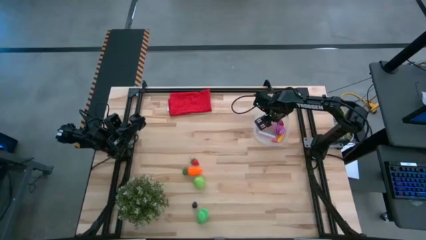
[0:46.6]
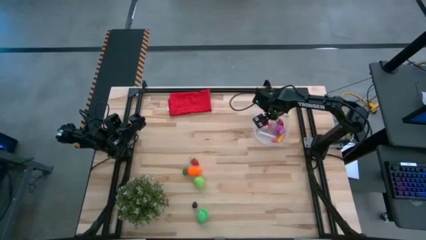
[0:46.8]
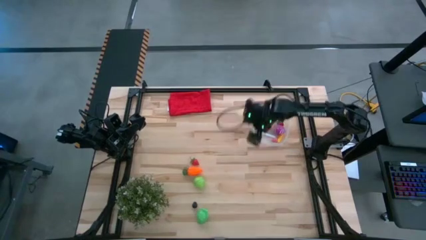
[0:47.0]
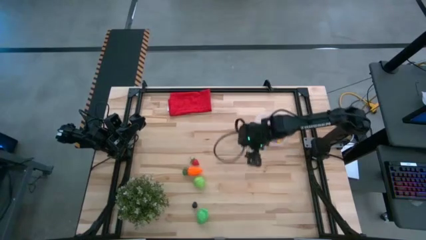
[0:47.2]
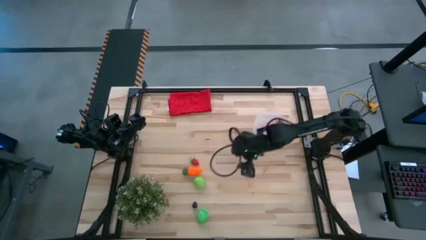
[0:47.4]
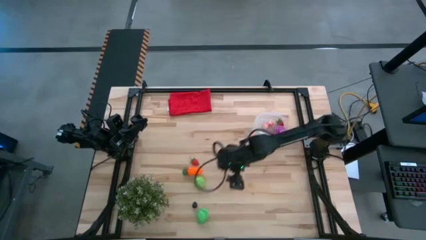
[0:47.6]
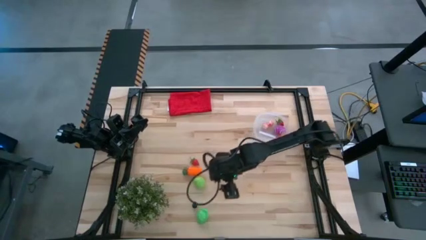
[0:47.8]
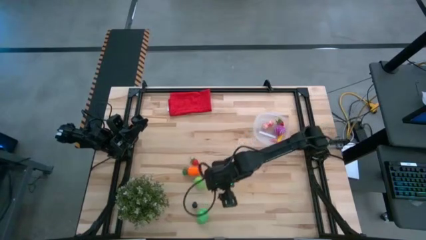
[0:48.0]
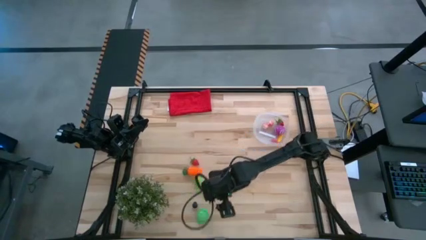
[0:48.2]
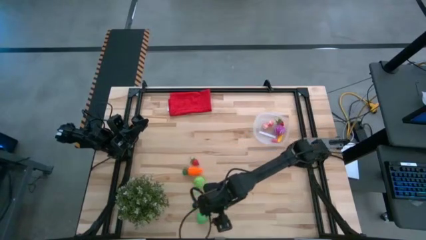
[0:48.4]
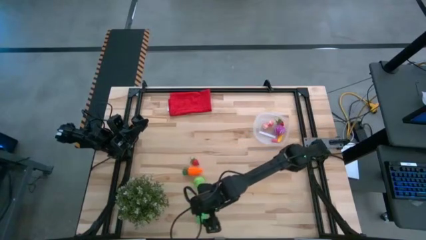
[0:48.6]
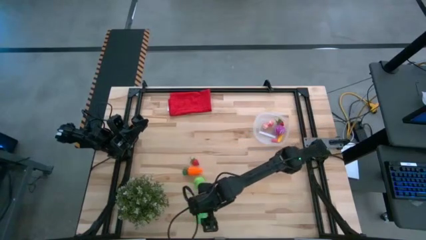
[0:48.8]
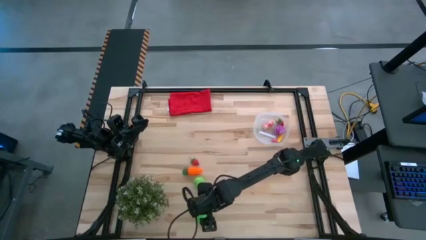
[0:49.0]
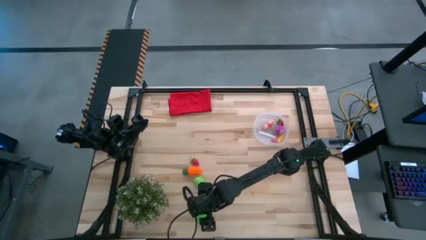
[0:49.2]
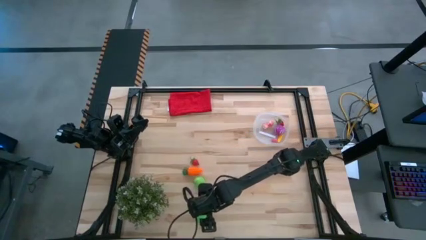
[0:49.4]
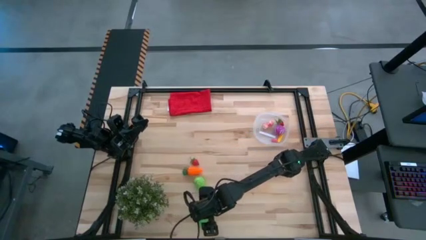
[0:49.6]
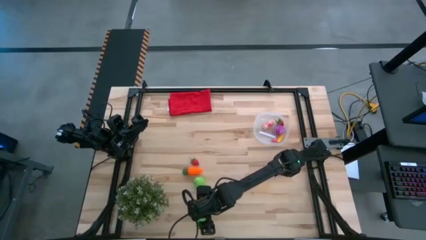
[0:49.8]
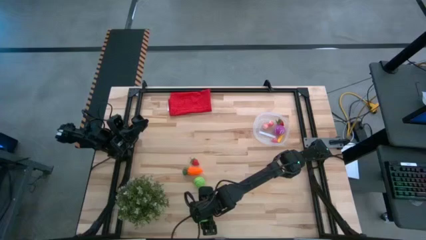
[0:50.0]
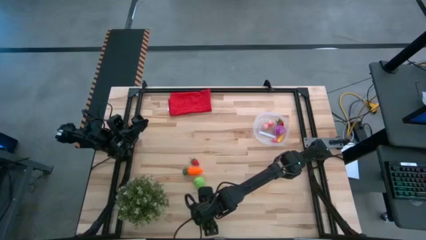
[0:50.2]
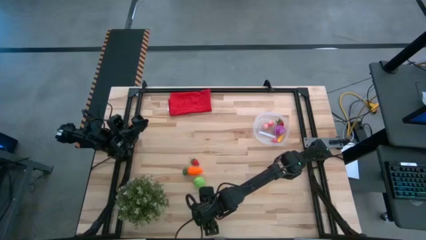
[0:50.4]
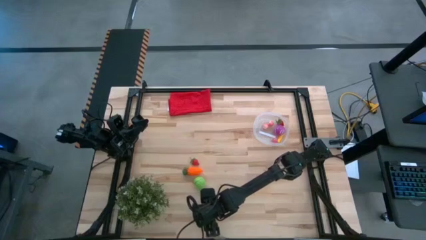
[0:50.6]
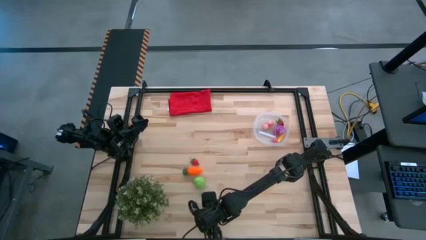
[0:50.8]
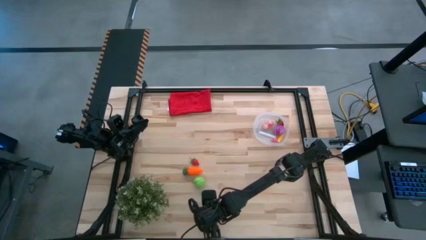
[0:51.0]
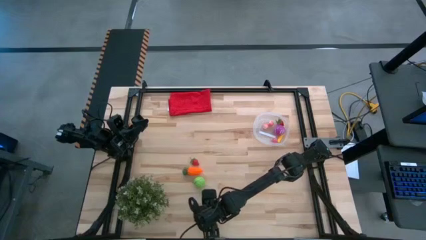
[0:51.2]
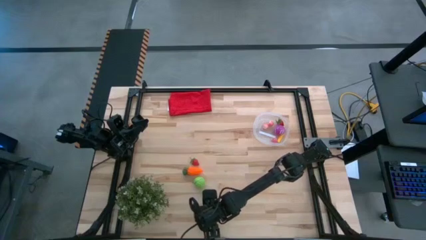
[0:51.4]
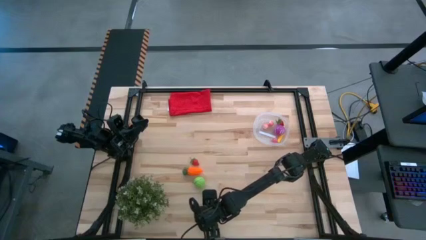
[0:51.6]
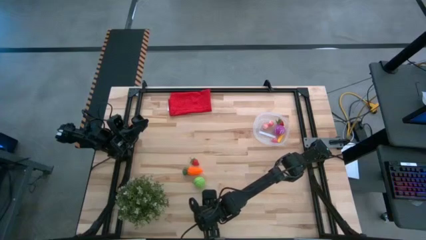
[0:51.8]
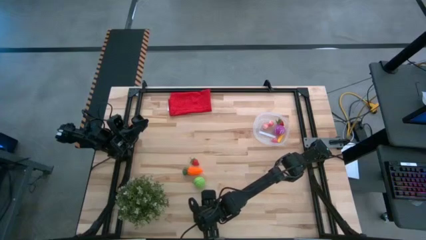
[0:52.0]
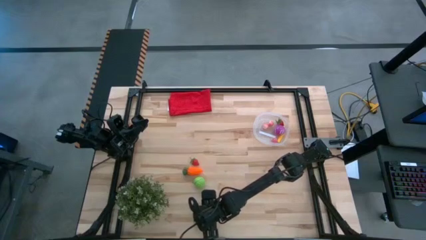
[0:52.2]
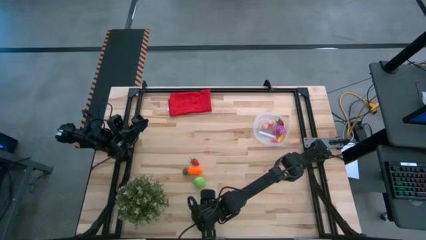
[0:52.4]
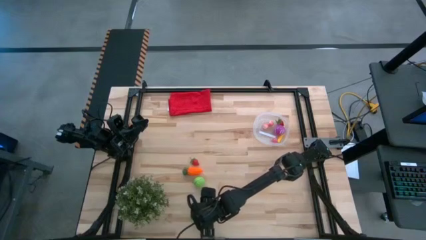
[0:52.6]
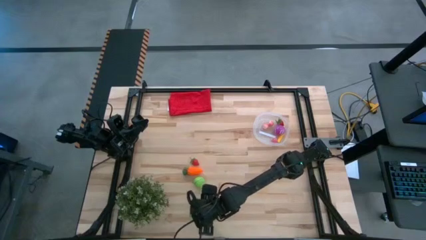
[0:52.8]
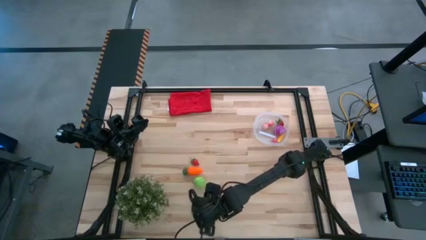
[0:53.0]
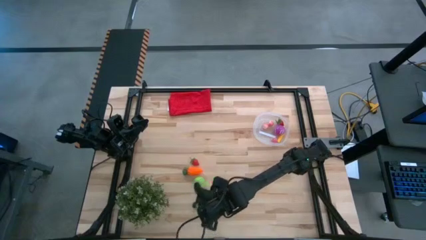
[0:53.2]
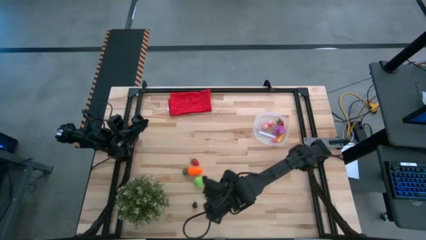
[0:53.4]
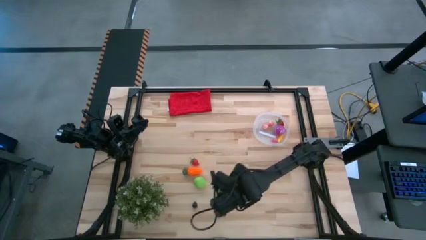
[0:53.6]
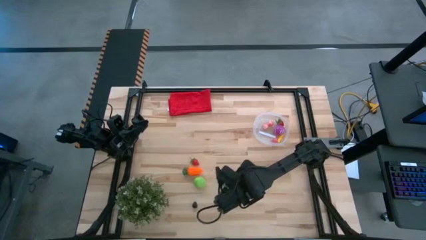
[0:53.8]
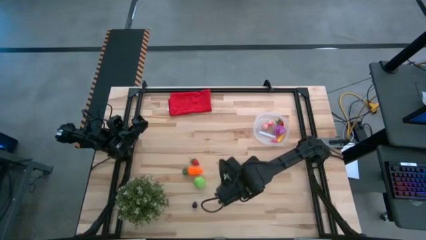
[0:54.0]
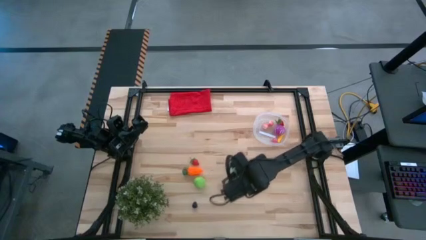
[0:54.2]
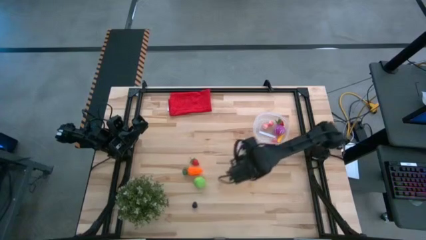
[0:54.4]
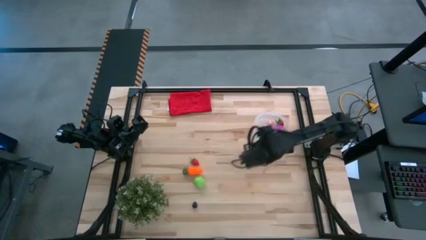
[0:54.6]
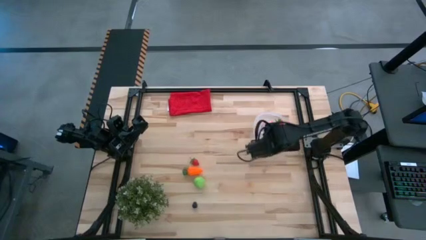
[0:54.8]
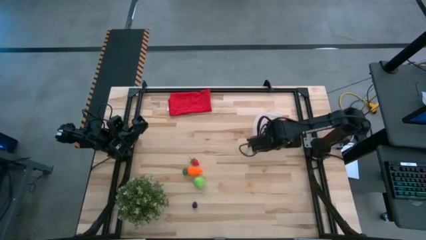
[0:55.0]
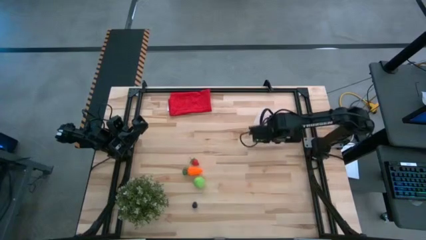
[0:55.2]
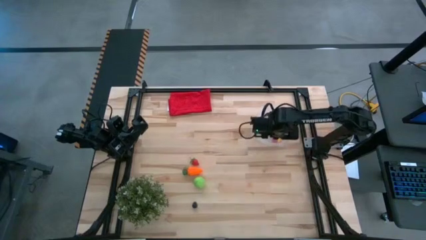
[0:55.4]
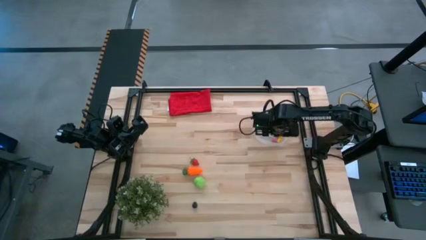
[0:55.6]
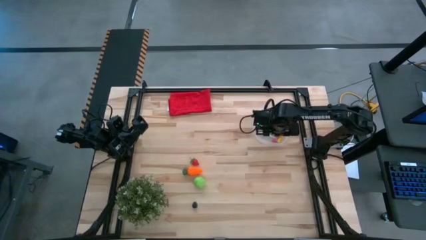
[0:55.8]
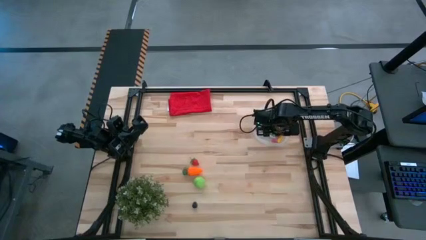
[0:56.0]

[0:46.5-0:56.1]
Task: Pick and placing Produce into tupperware
Put the green avocado into the transparent container

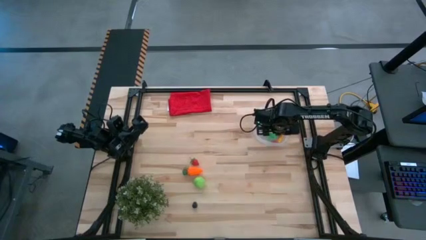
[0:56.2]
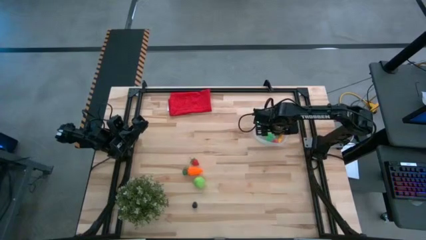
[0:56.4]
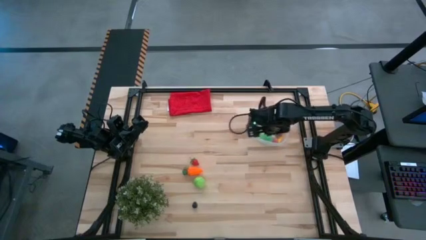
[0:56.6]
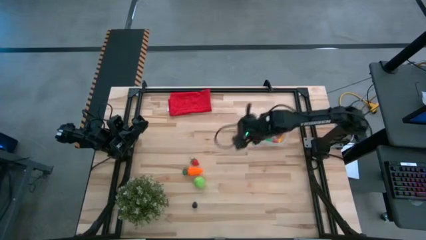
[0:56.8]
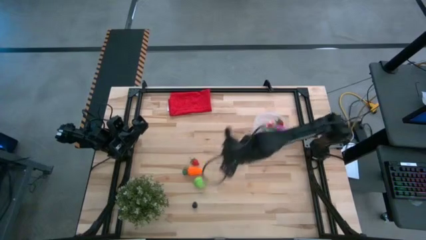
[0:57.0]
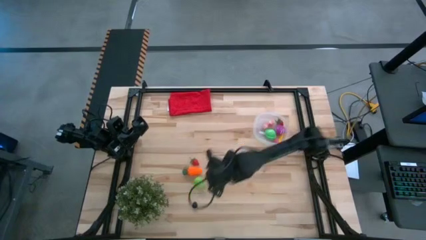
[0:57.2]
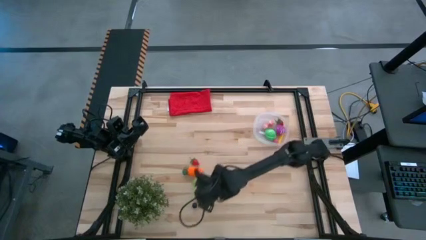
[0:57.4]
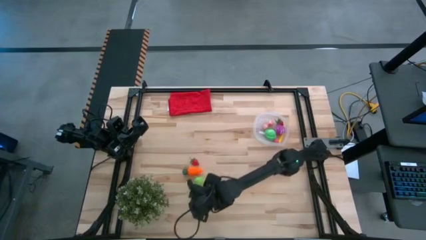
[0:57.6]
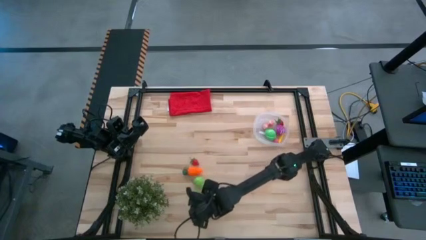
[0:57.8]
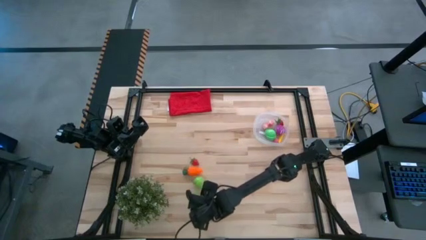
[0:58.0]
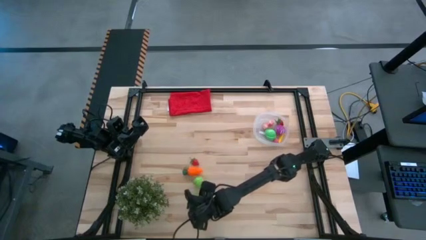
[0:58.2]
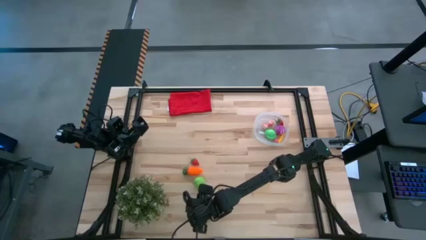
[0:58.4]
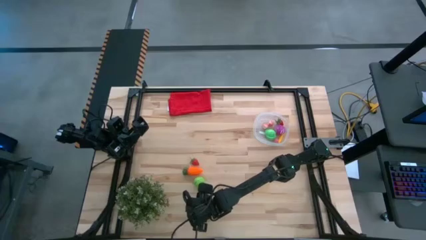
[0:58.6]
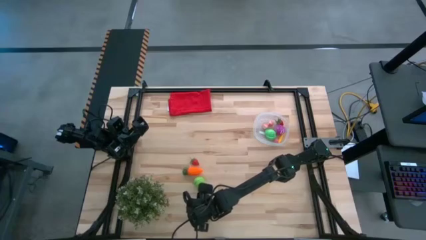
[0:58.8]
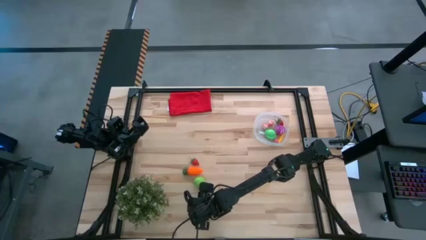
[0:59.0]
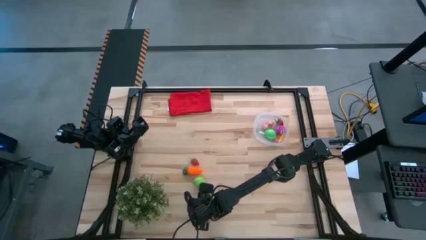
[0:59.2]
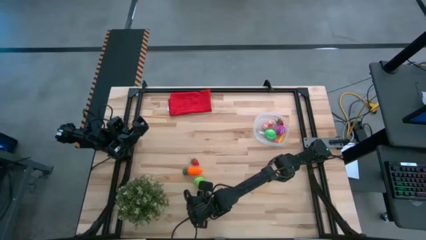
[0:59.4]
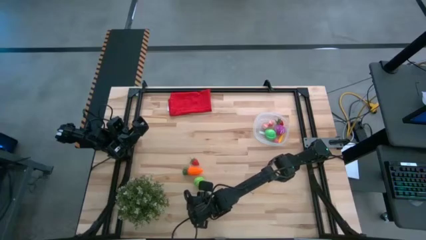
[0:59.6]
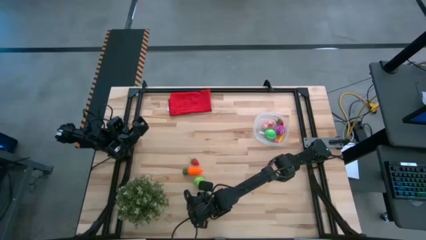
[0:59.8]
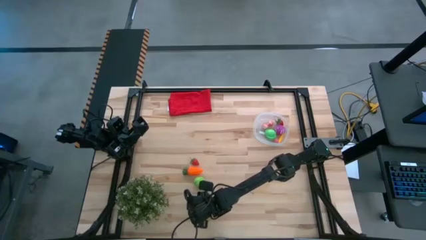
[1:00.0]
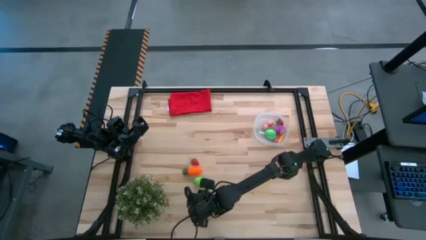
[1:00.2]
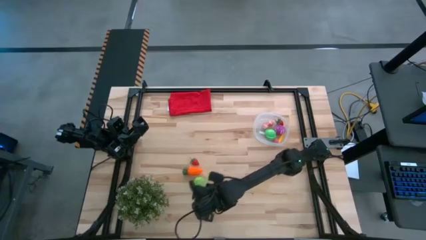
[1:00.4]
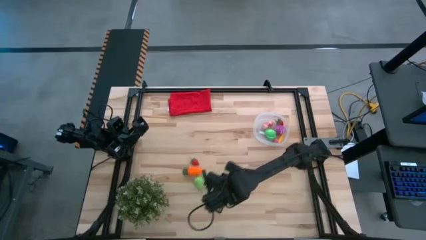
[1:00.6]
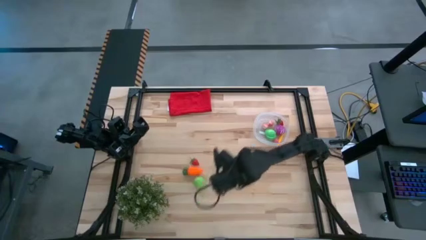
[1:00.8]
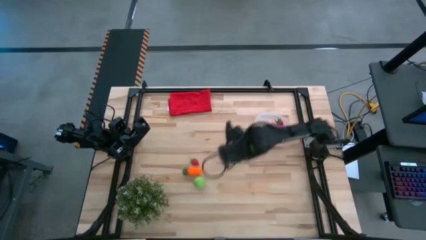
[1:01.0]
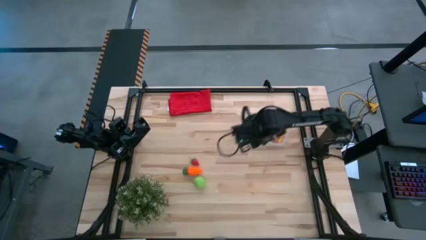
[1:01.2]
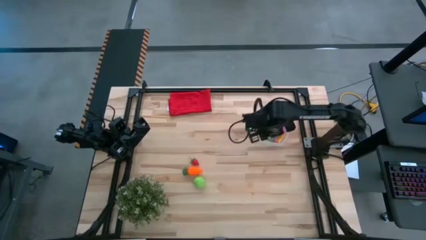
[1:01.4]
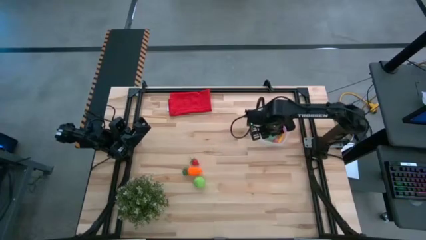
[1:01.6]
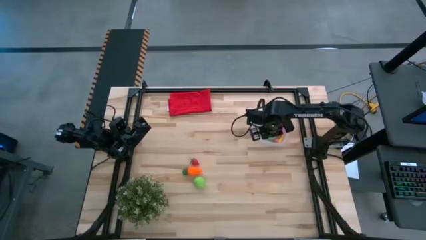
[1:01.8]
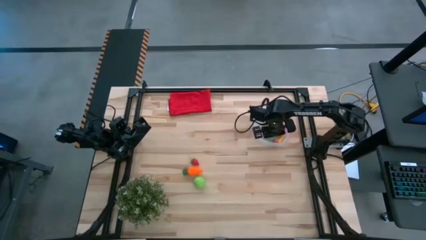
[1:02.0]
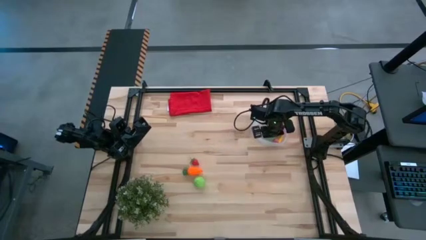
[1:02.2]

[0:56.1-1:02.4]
Put the blackberry into the transparent container

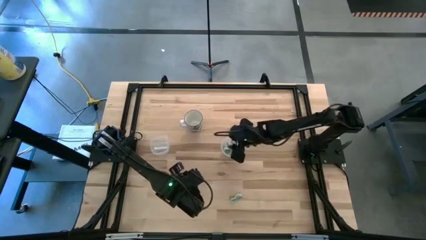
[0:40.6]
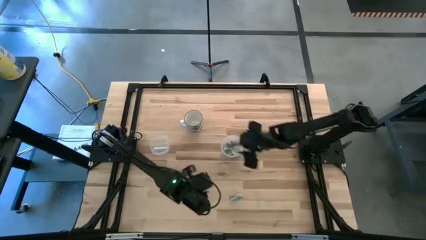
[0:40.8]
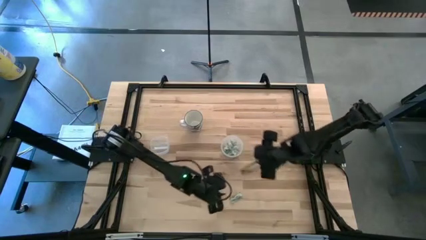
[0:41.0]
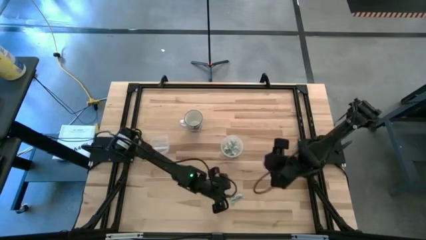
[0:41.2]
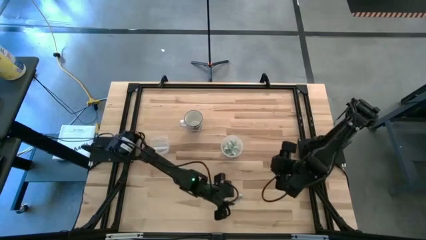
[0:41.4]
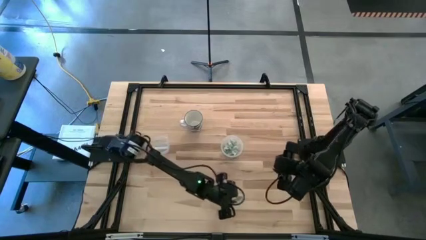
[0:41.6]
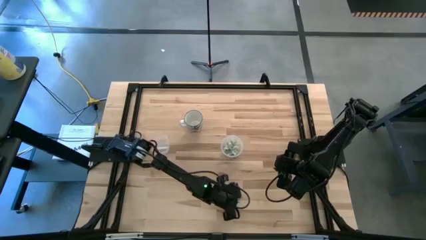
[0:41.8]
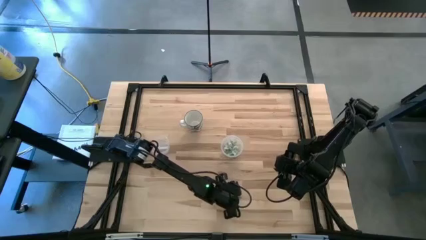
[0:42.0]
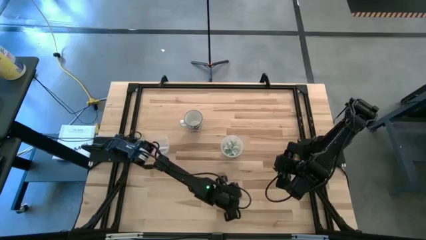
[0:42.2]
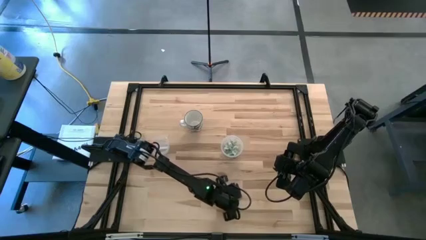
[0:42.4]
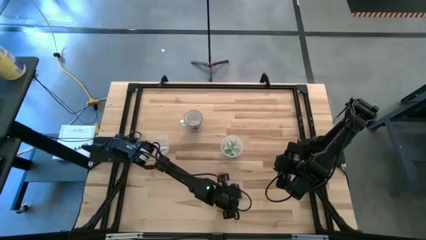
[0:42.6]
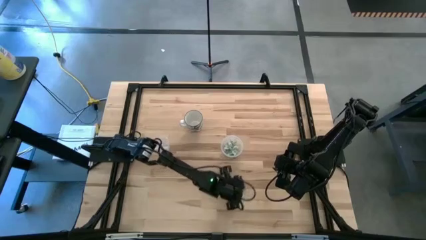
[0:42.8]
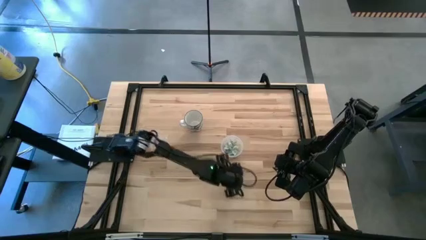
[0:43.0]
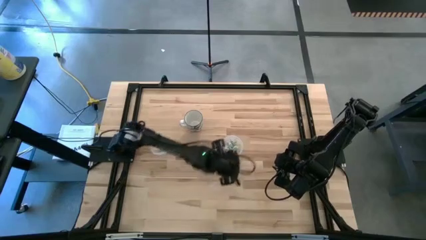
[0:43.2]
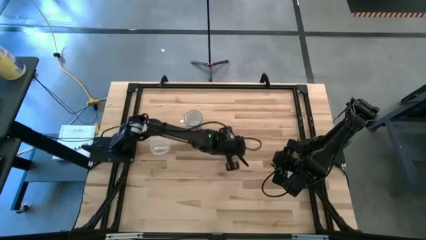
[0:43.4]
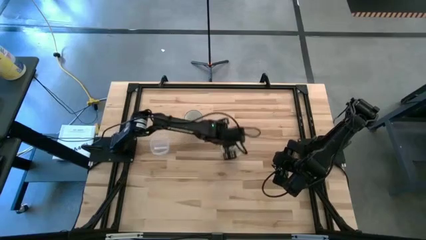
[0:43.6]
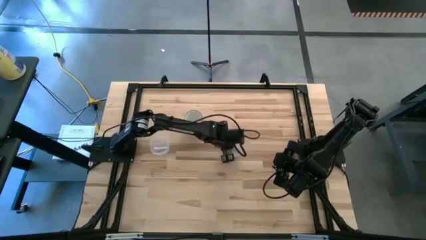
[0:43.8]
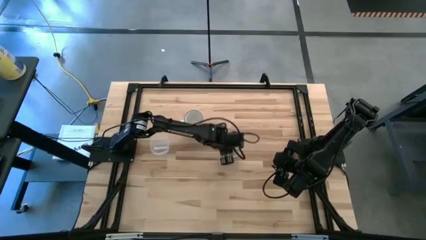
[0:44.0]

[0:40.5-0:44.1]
Task: Pick and place Stevia / Truvia into bins
Put the green stevia packet into the right transparent container
